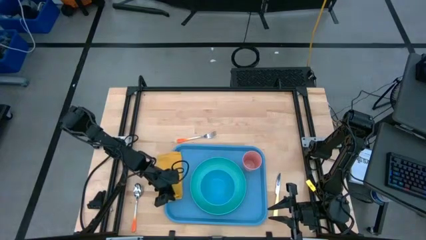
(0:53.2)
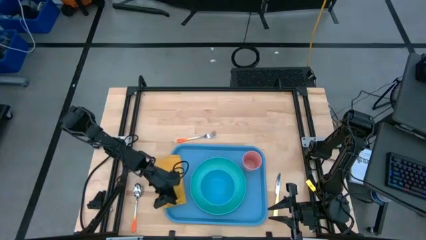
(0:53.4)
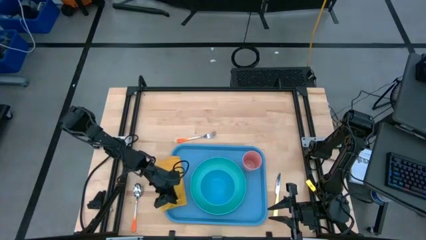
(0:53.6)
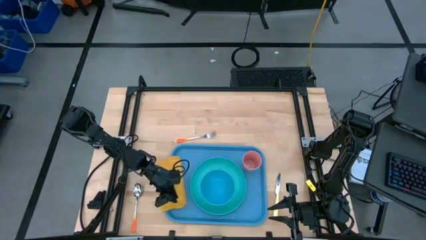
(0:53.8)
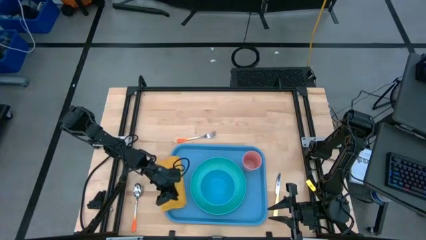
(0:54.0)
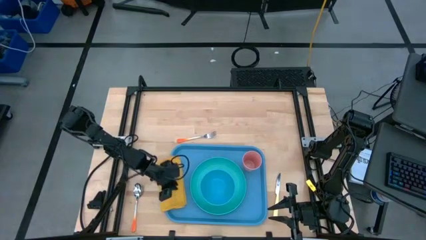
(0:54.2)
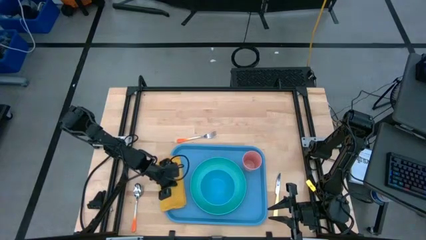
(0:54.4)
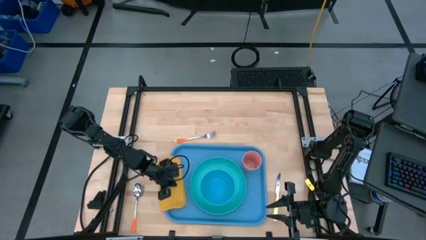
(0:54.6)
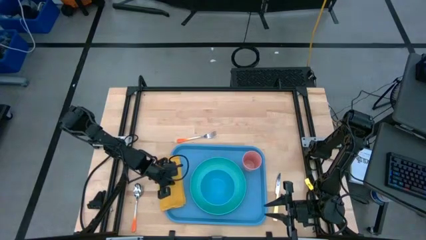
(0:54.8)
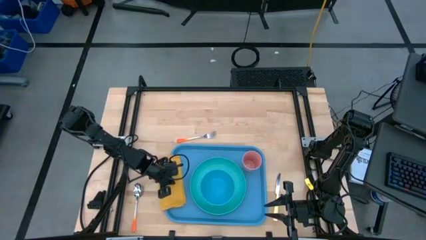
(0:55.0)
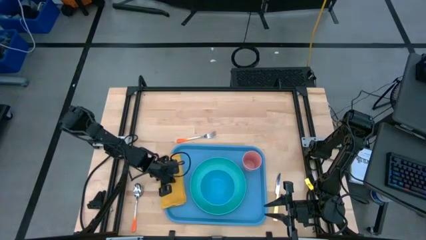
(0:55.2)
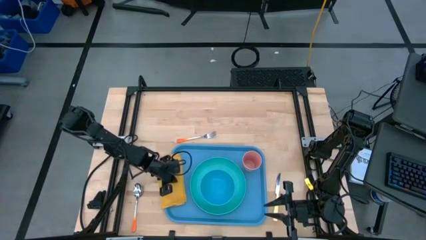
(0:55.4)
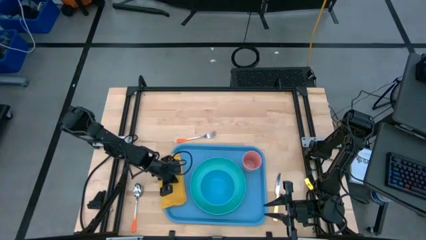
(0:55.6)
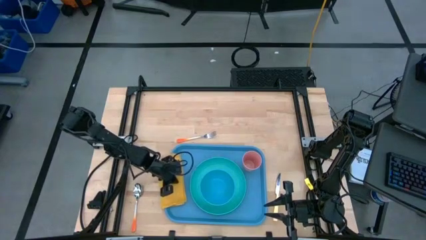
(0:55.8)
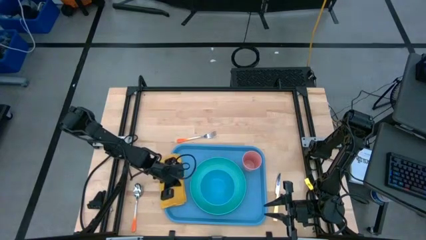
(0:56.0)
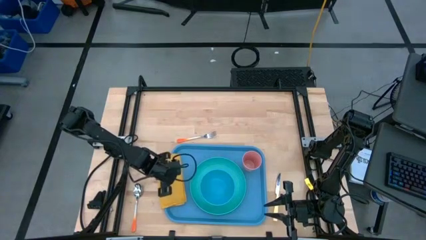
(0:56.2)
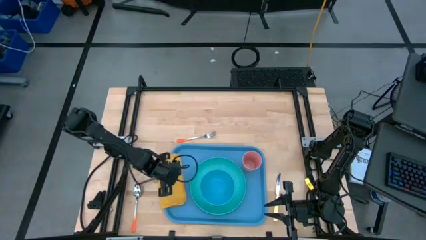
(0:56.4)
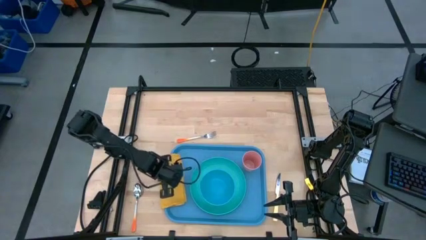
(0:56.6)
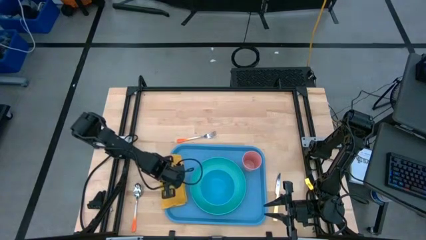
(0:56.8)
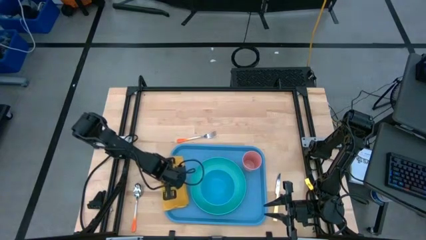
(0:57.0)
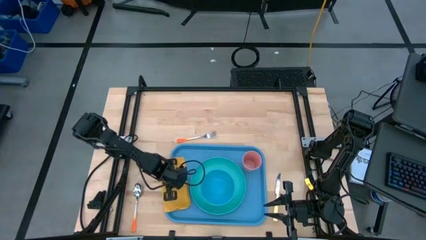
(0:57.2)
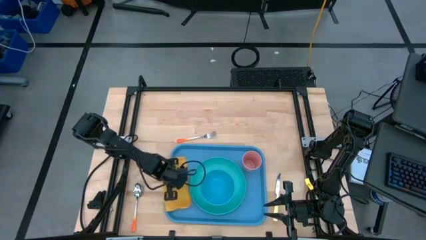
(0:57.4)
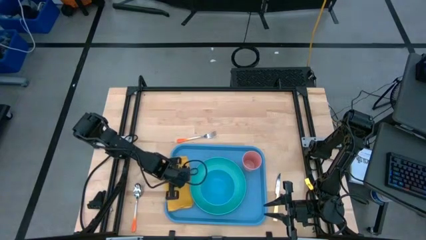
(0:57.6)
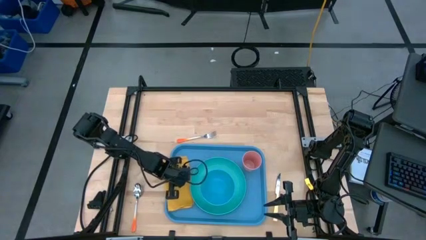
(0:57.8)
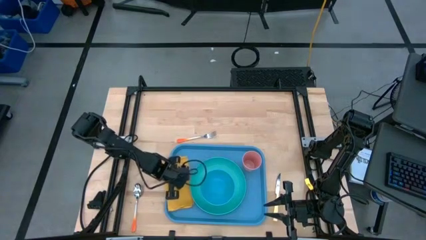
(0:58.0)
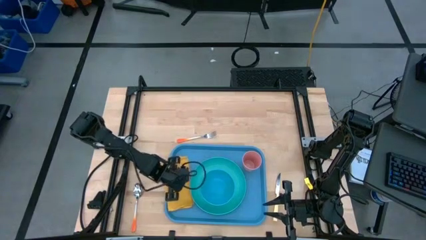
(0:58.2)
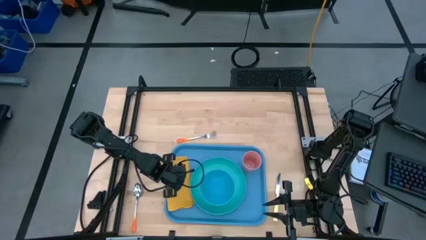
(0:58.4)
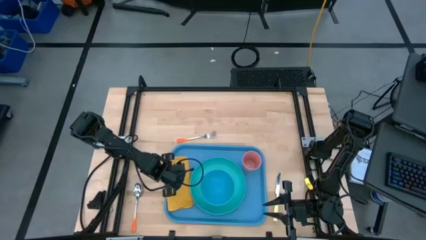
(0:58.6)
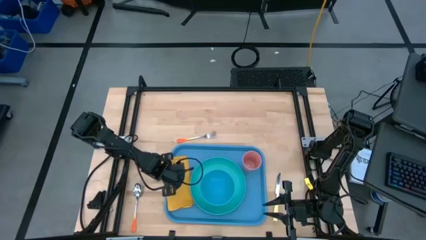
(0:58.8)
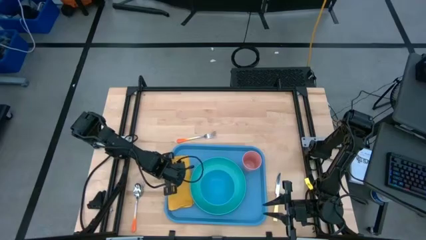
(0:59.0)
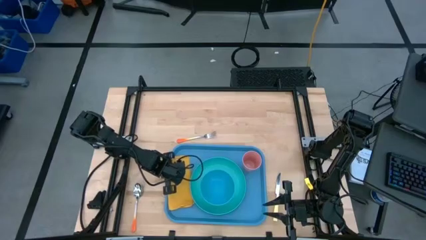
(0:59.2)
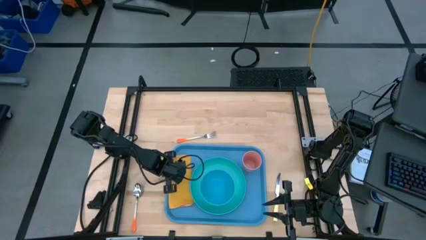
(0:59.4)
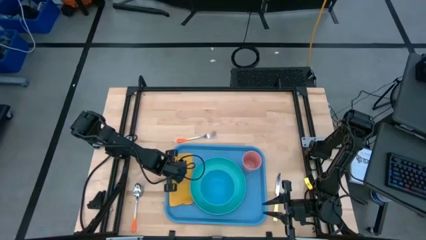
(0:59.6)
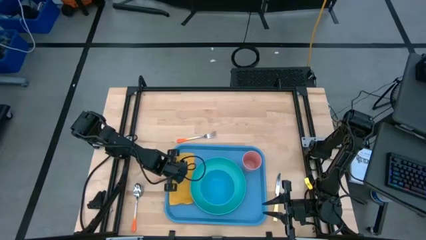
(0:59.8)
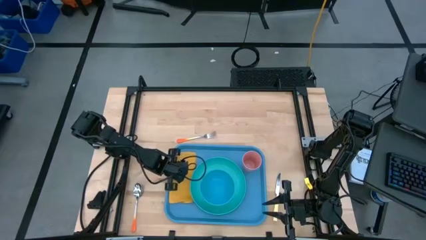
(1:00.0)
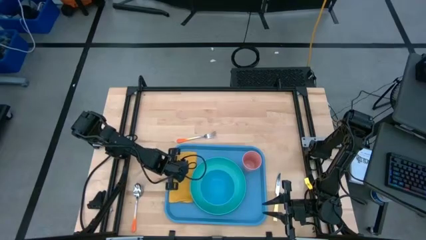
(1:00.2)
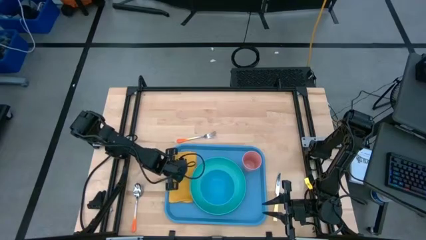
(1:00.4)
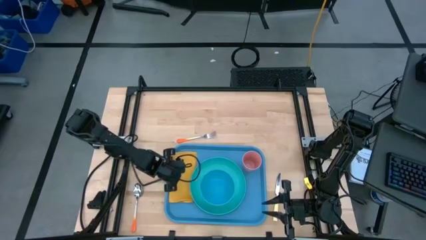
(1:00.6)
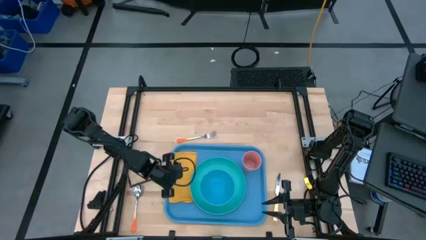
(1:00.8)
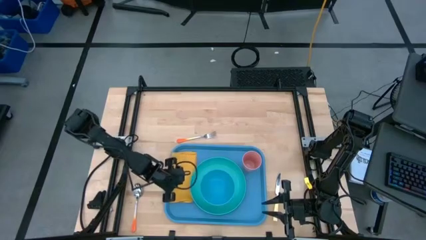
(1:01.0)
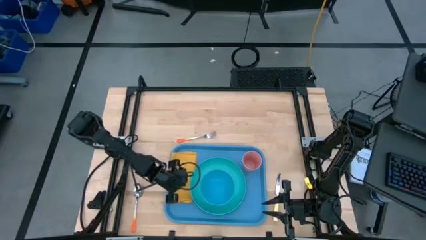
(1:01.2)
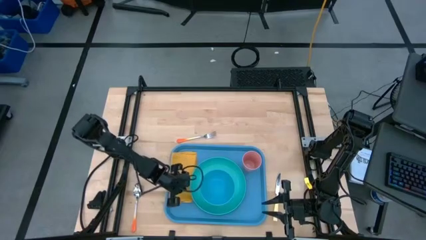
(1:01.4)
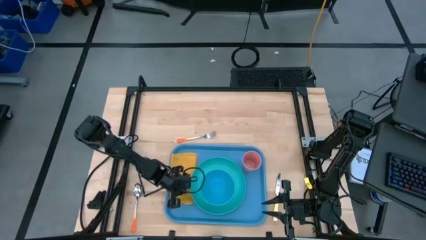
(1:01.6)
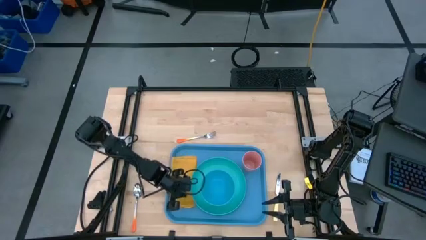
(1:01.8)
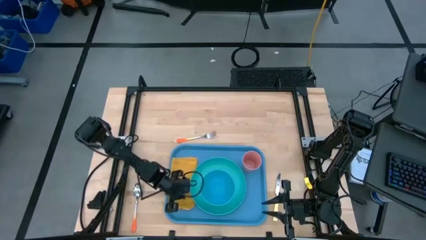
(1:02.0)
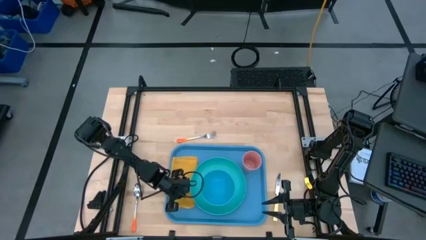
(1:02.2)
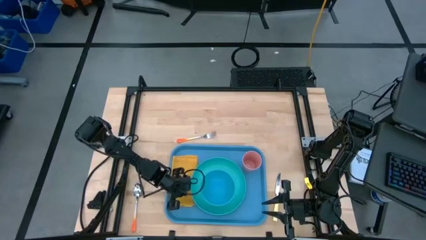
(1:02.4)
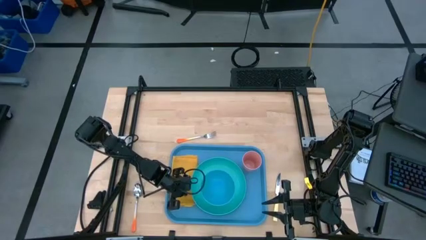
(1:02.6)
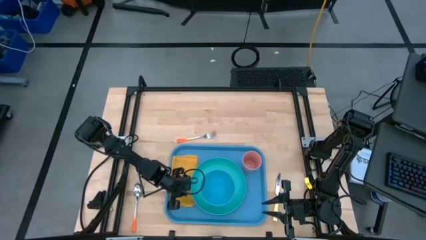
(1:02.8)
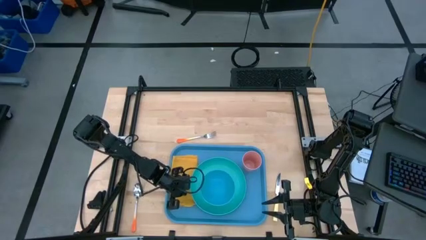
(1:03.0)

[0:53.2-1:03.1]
Task: Set up tray
Put the yellow napkin on the blue serving tray to the left of the light blue plate

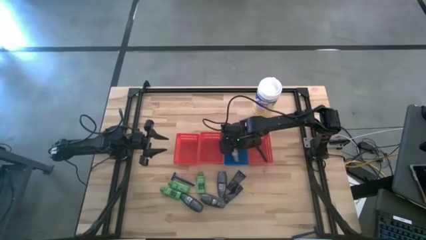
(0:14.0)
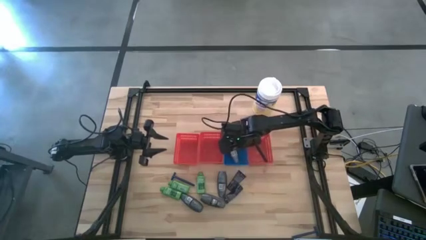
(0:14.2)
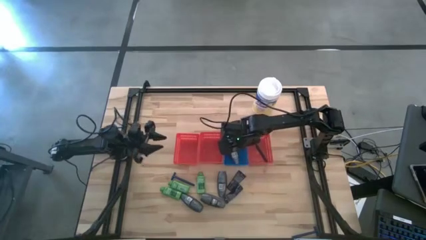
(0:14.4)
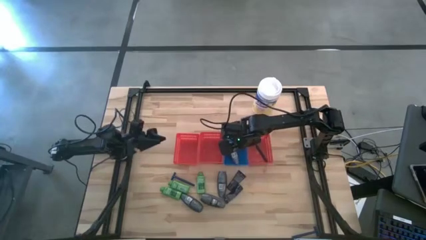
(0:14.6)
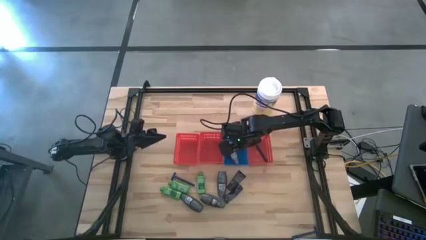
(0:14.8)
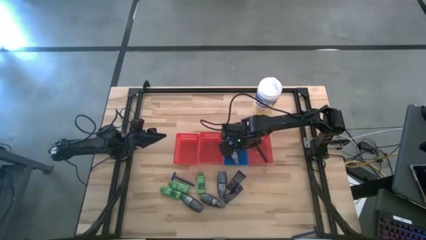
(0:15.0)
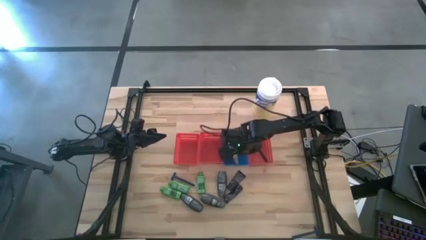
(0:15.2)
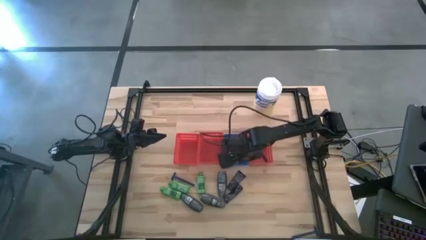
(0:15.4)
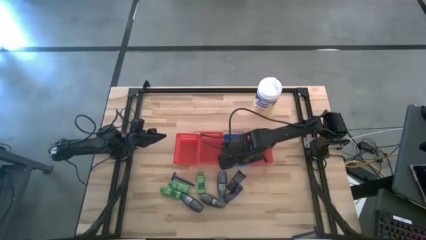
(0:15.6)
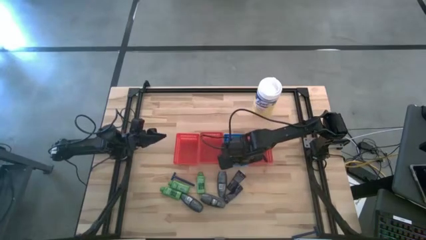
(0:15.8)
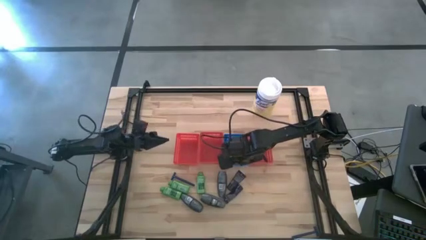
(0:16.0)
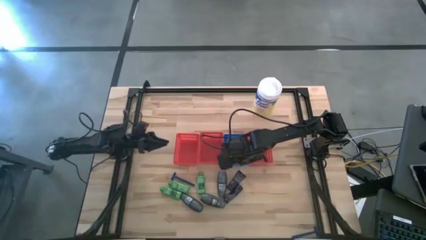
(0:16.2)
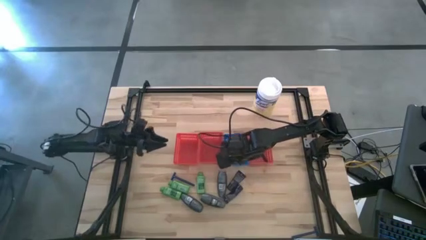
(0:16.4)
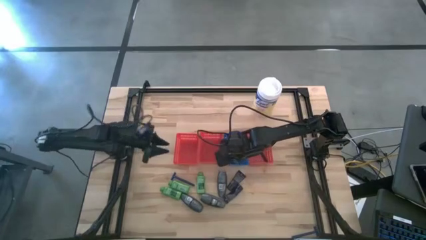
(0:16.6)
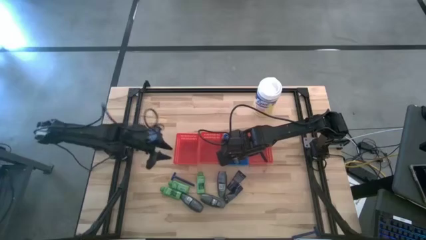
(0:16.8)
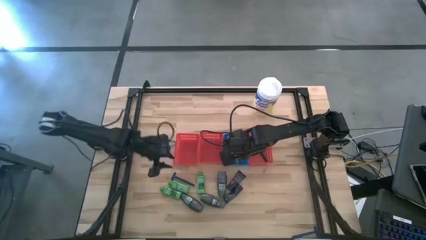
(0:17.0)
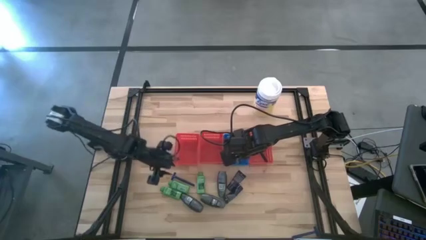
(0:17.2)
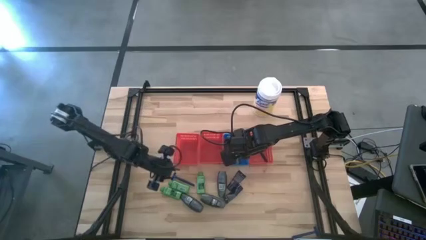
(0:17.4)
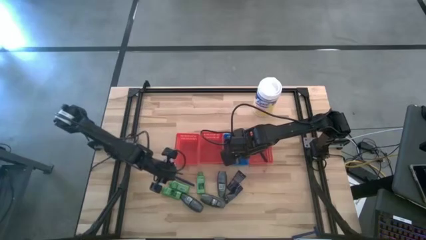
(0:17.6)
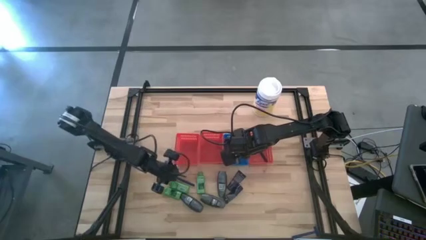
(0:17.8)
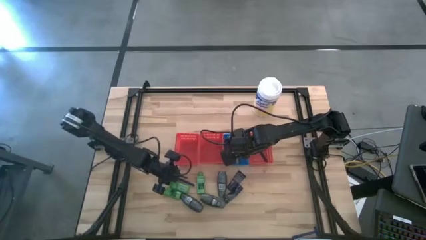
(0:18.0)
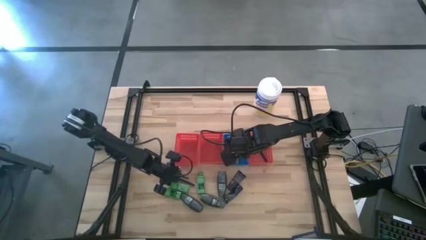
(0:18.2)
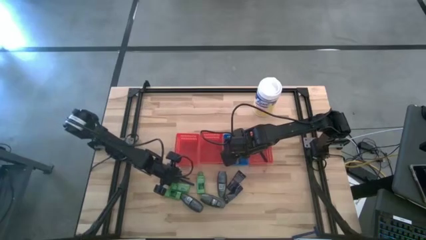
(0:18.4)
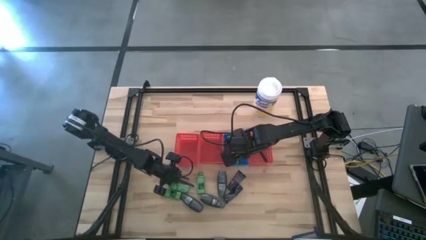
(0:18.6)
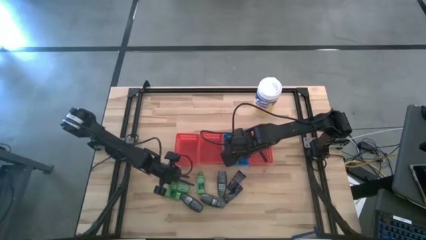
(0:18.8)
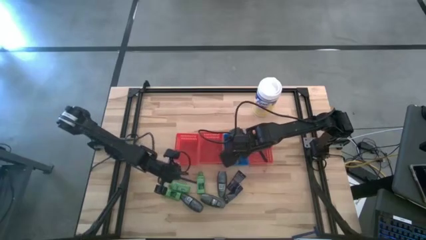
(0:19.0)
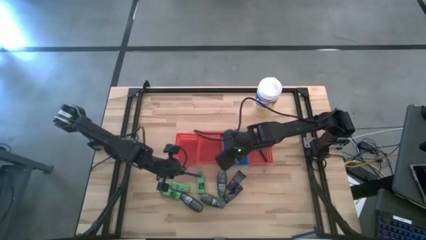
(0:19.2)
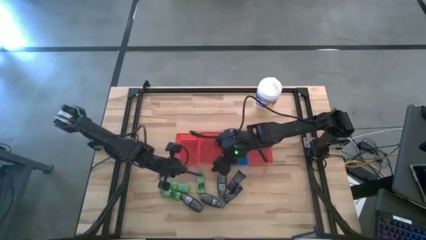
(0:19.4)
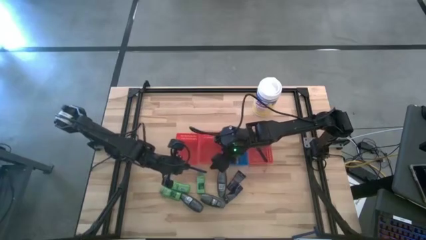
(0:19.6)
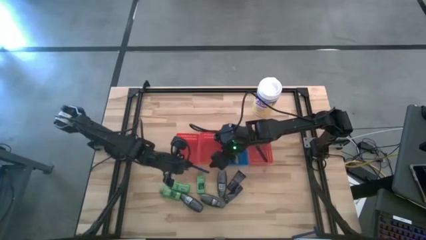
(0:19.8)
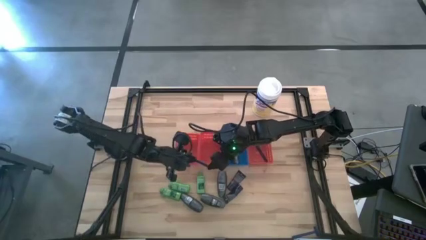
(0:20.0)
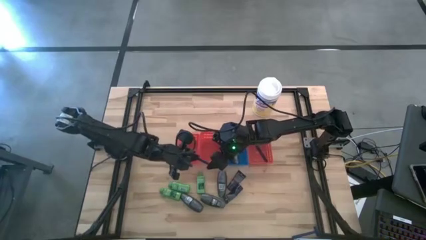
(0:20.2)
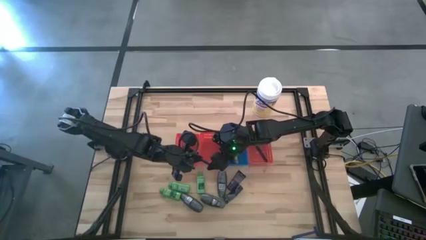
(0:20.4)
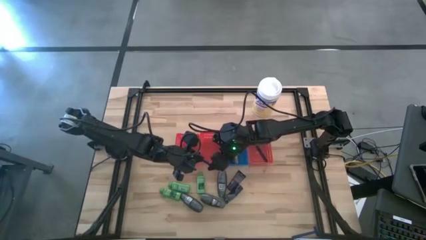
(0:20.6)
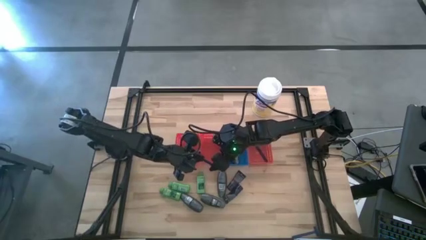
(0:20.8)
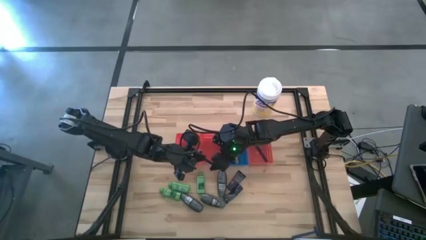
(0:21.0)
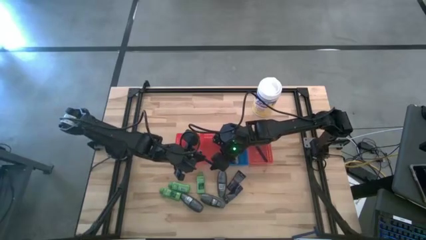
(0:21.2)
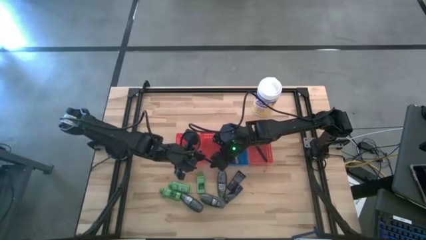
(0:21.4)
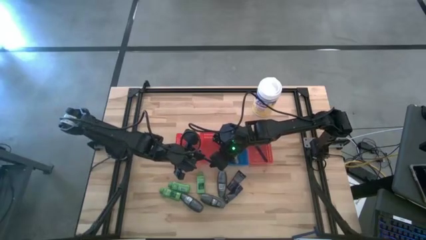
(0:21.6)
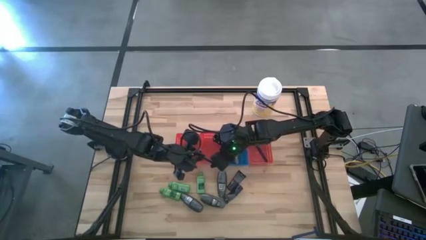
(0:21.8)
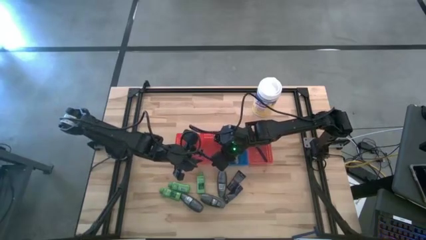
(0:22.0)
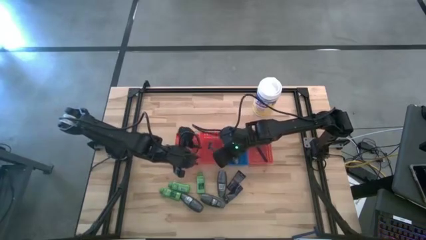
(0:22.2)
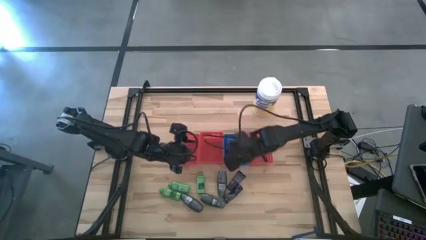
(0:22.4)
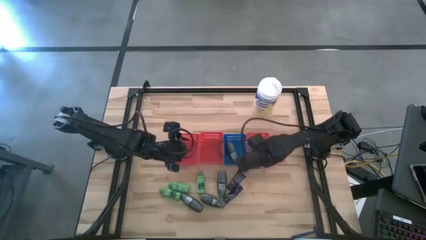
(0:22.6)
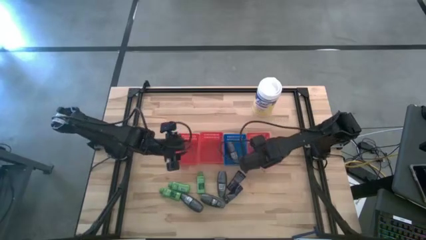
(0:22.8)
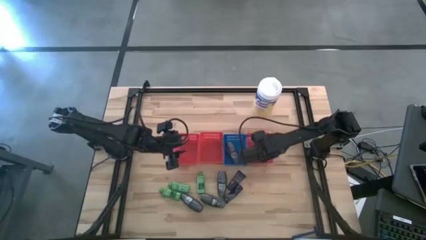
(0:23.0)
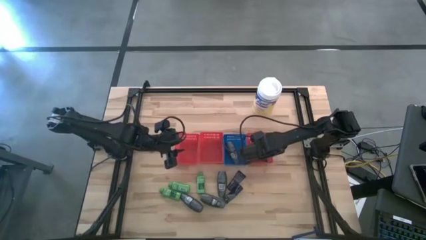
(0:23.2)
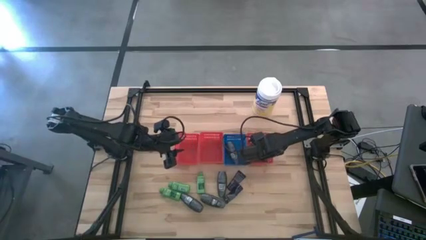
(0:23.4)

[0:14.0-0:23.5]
Task: Pick & Place Travel size toiletries
Put the razor into the right red bin
